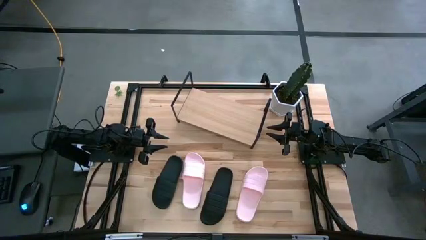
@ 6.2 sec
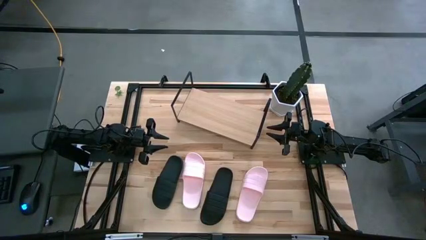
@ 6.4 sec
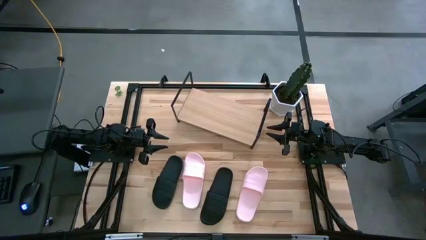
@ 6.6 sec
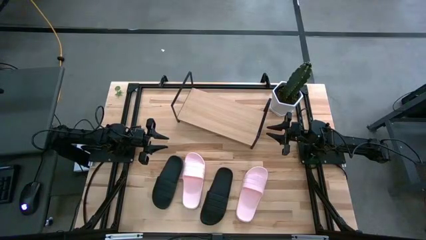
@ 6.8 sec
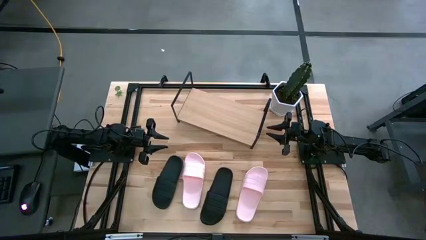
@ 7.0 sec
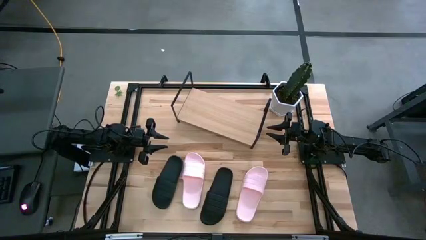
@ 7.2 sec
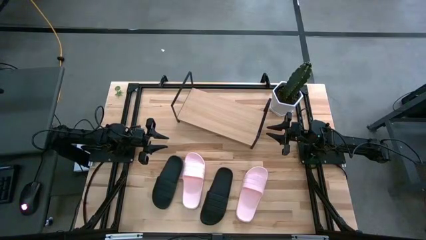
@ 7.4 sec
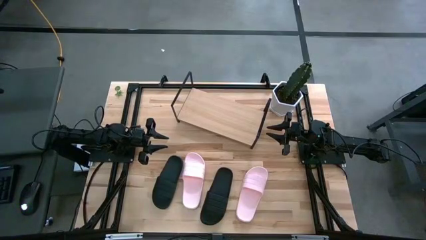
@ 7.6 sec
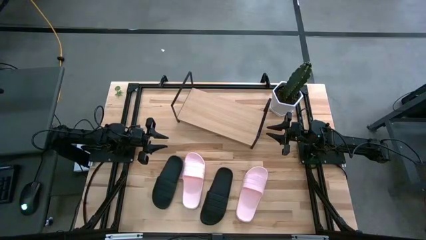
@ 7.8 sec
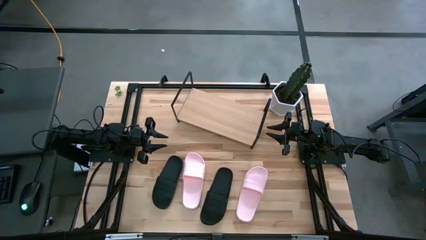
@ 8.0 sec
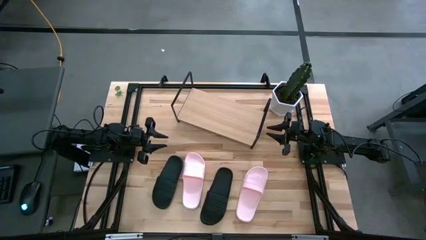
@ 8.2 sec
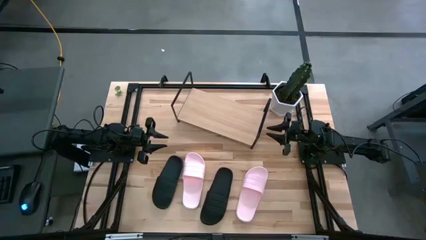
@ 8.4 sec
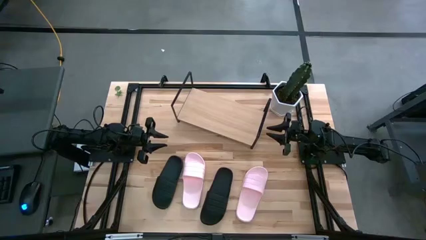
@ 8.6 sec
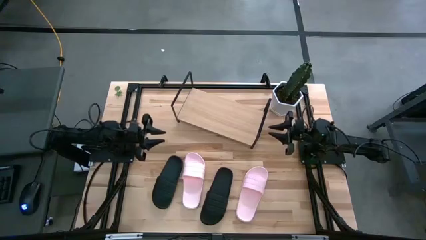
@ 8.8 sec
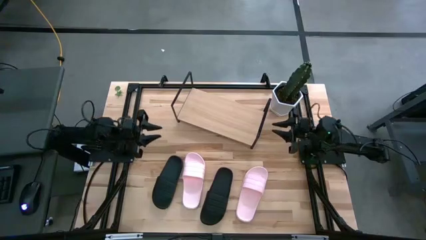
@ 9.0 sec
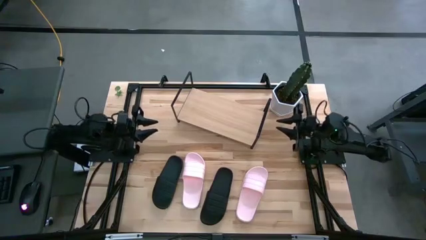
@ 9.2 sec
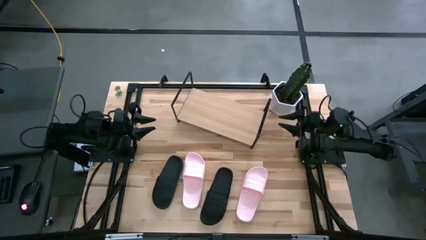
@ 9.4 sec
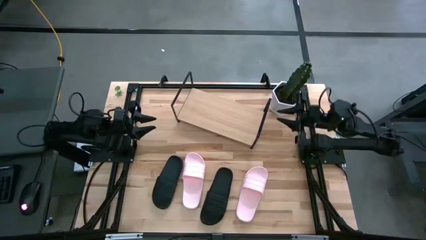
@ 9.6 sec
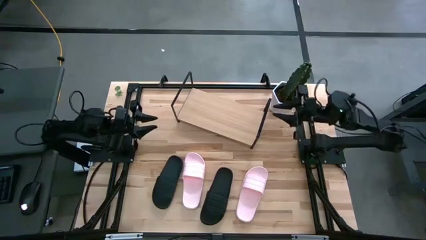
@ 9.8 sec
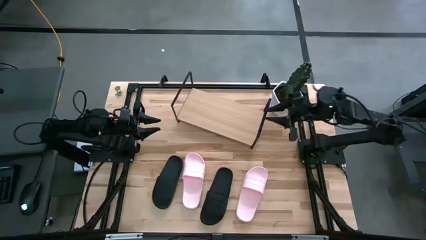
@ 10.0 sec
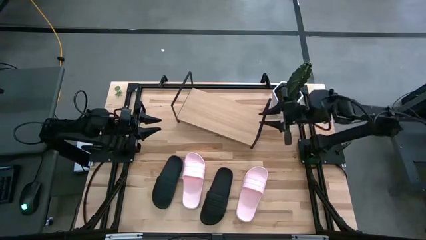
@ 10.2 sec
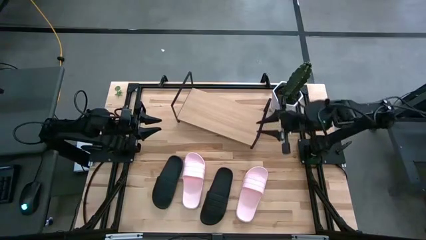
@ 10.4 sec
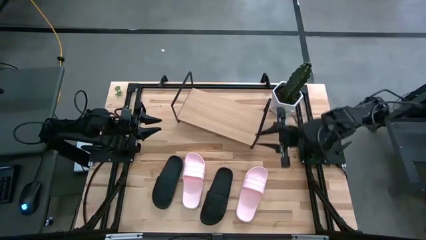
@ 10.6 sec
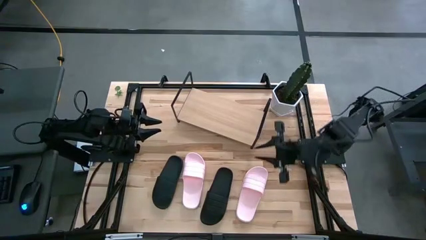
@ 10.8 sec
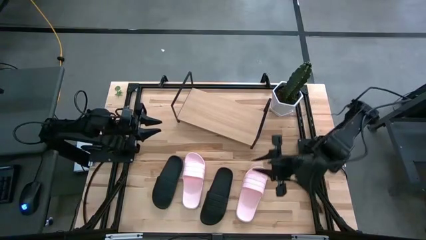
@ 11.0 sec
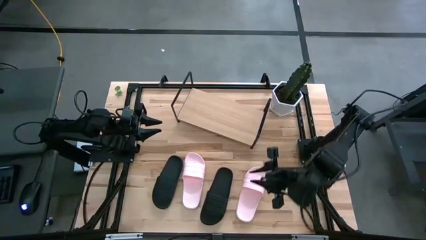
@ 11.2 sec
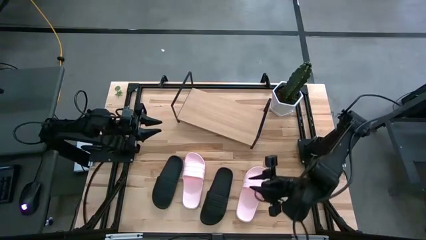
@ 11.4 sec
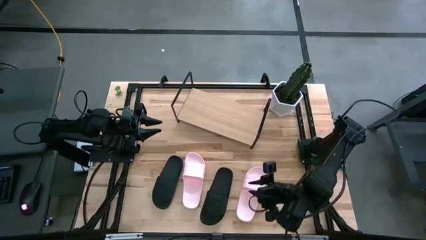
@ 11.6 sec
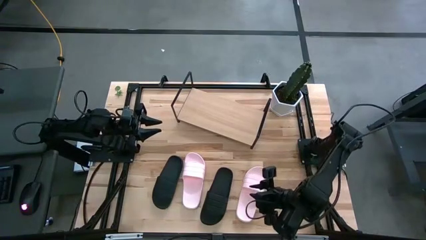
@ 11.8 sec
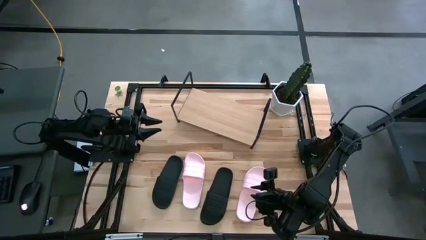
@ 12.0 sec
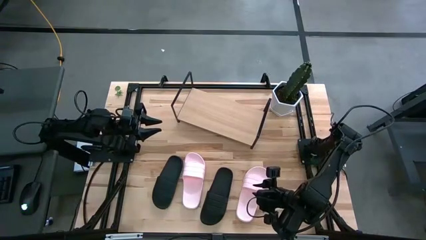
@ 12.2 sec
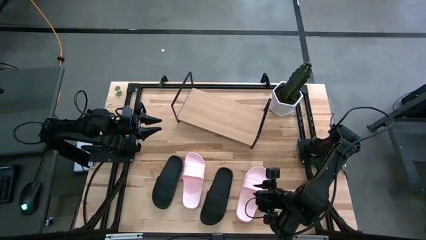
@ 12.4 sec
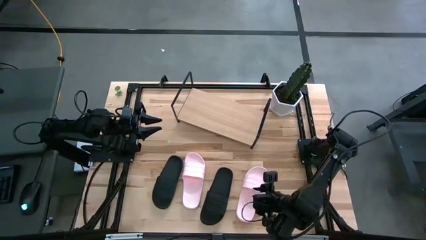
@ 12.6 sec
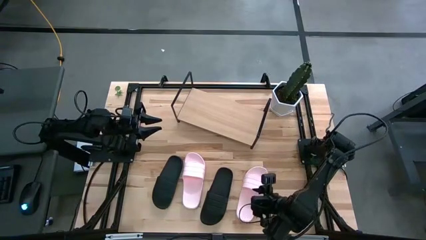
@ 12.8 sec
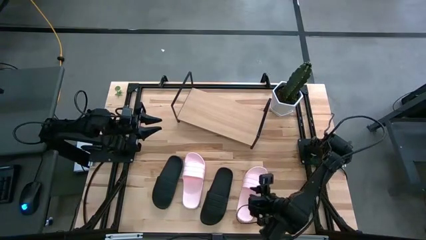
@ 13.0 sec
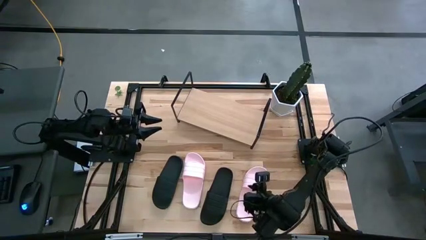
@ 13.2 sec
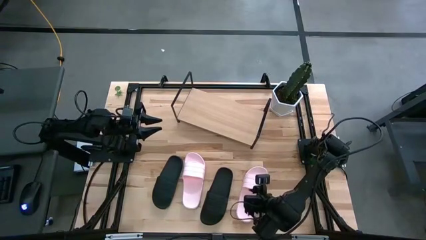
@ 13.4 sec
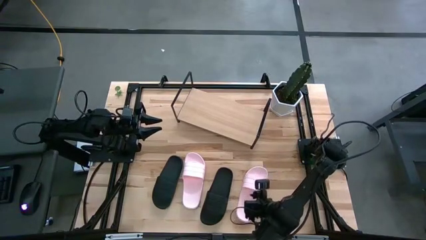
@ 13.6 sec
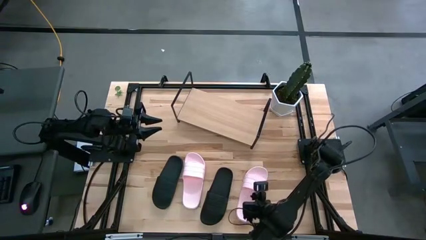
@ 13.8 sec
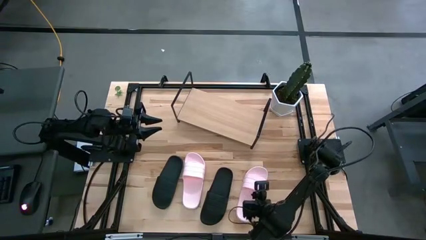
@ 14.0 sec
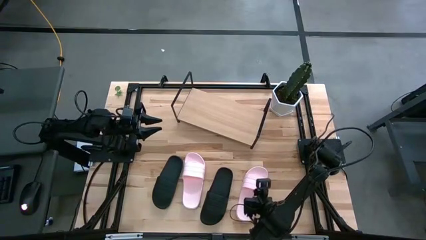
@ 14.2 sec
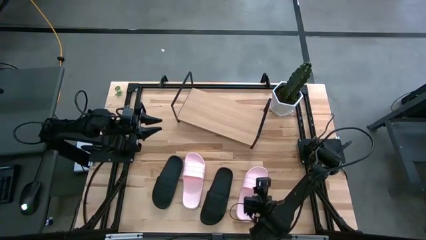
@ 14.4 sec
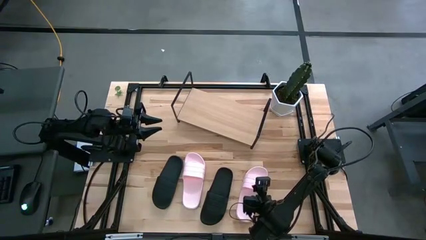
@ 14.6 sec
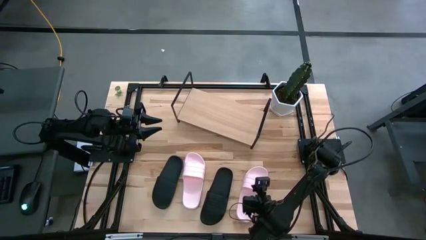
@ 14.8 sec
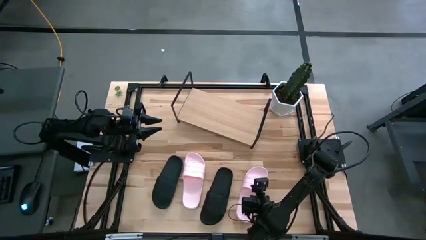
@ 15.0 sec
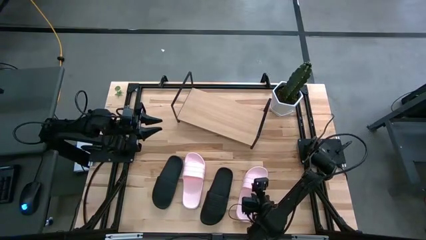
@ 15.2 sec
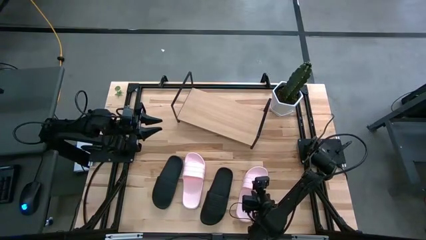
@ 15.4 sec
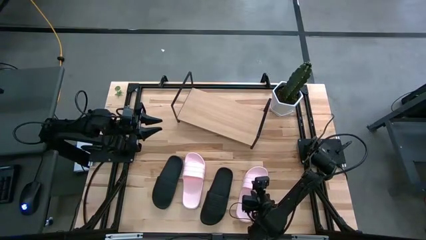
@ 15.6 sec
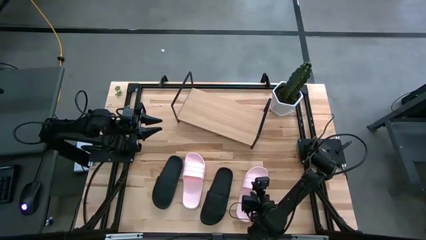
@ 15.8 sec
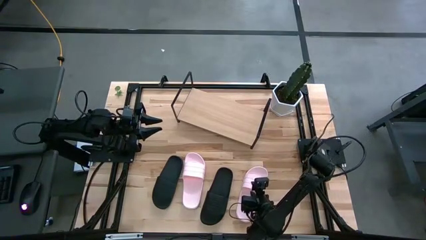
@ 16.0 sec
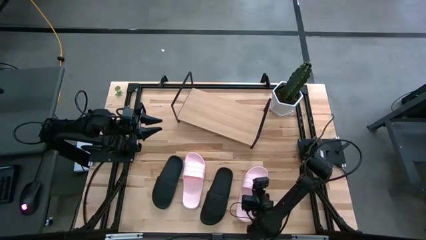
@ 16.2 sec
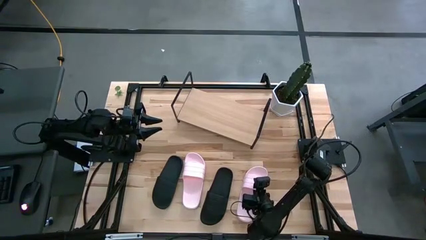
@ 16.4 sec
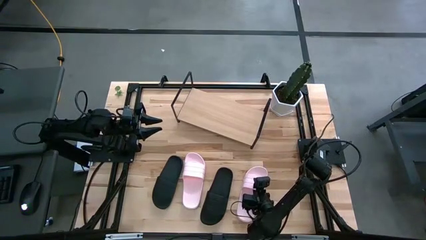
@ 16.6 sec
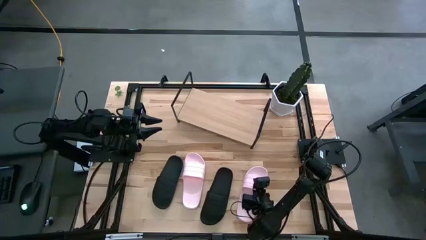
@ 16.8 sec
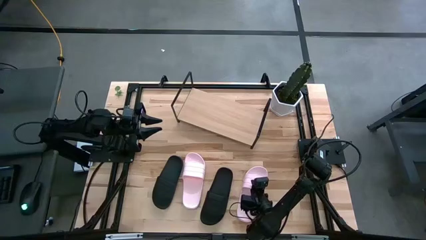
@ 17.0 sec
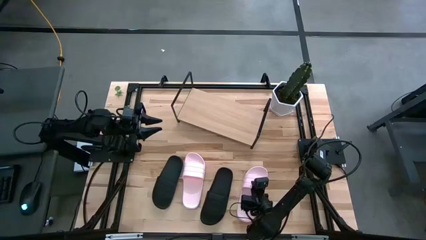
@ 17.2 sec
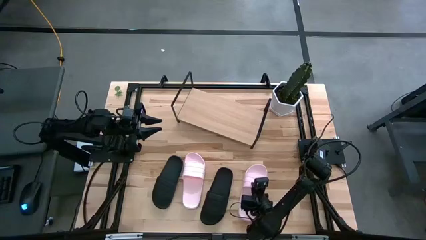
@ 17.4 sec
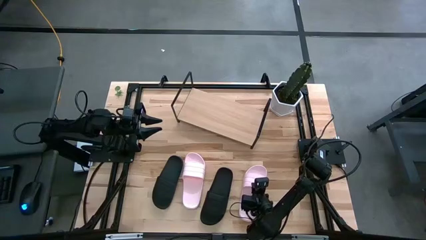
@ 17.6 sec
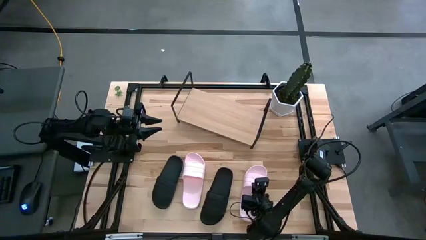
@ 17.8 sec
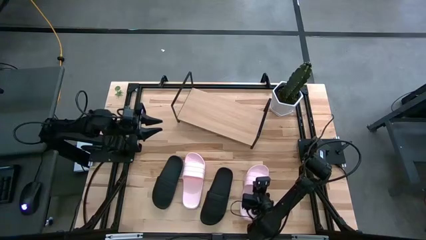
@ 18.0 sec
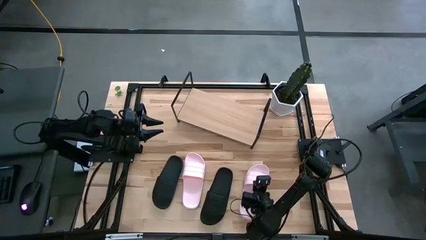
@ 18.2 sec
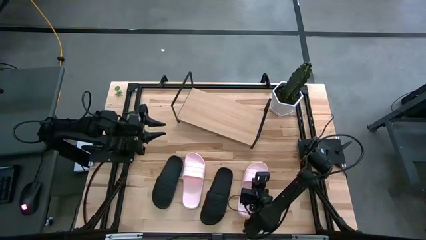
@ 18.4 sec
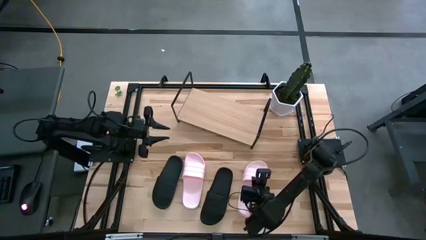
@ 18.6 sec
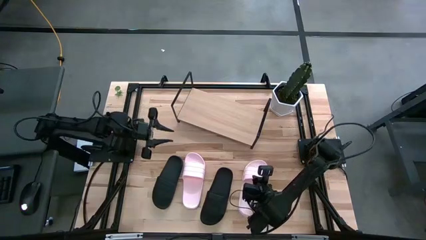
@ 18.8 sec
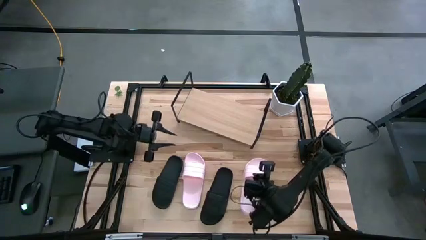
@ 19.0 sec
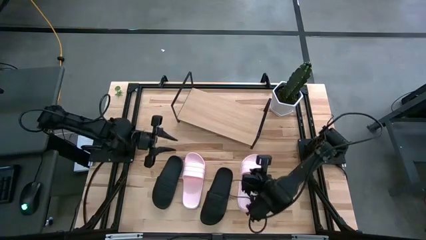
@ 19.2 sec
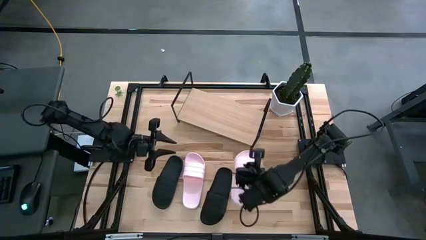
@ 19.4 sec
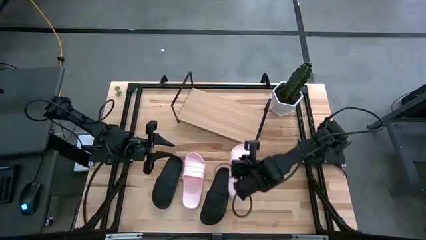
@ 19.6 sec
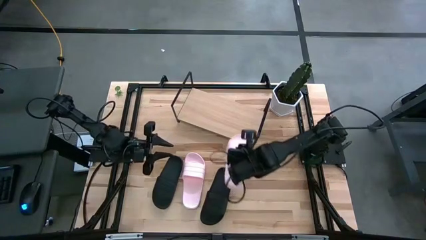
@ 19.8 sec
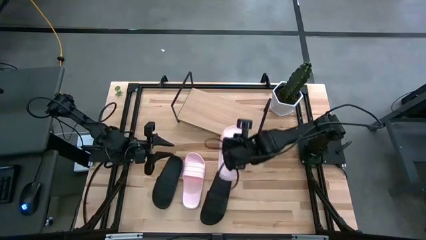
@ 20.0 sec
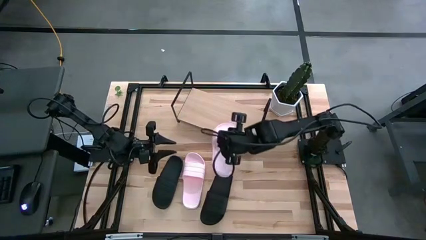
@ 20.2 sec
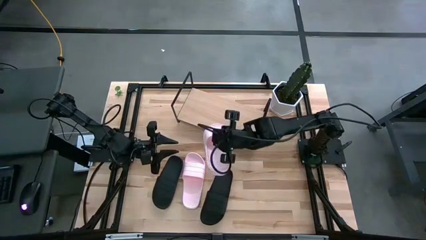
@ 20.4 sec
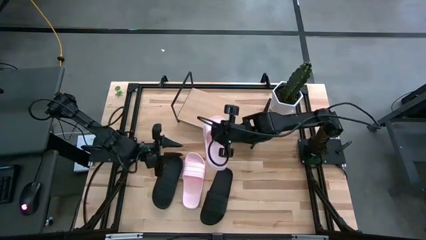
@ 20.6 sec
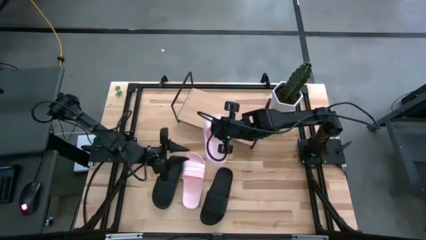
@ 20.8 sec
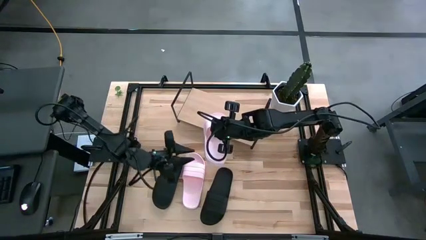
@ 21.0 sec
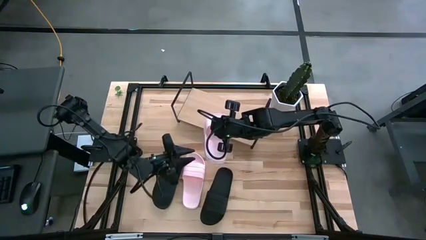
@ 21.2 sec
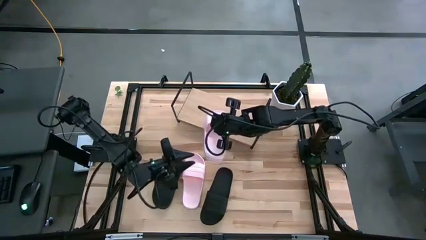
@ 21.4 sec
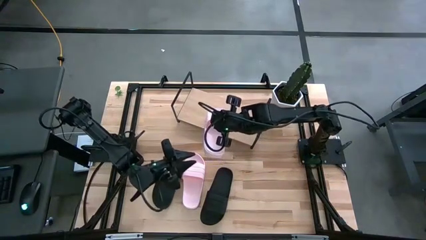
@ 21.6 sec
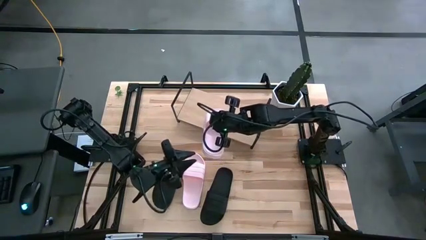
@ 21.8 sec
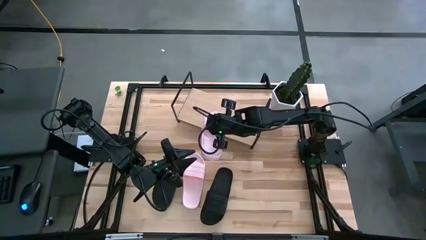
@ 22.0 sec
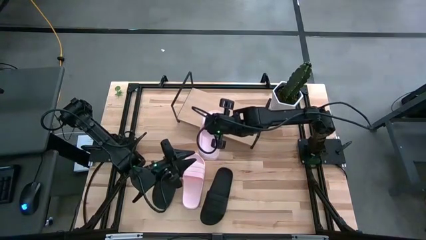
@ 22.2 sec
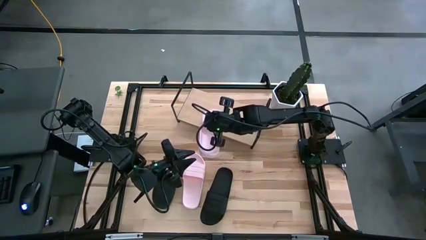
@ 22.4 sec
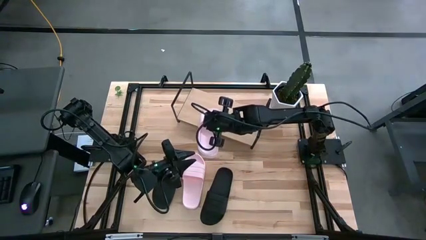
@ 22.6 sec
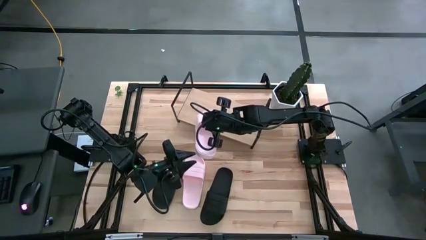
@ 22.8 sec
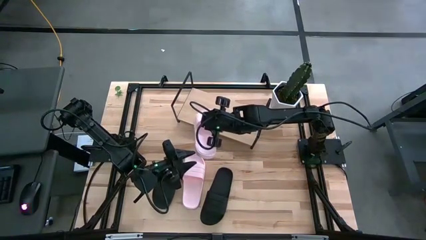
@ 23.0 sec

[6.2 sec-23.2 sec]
Task: Pick and place slides into the shelf
Put the right pink slide on the shelf
